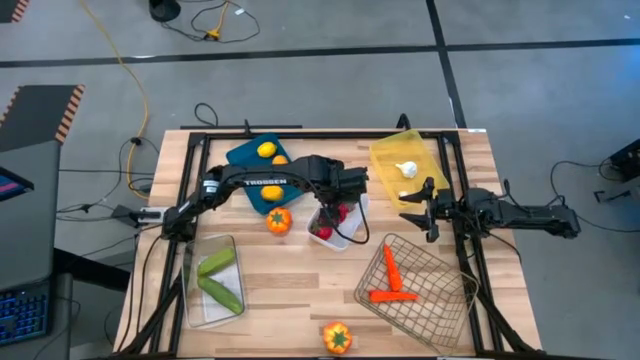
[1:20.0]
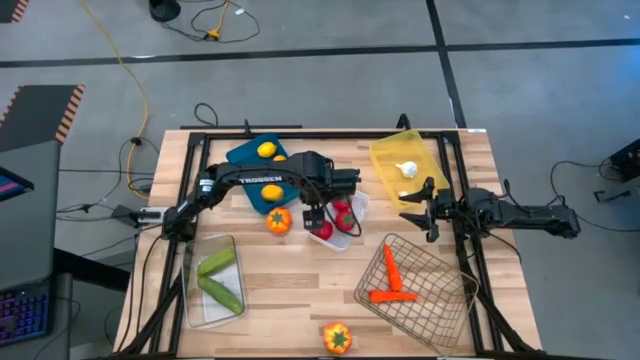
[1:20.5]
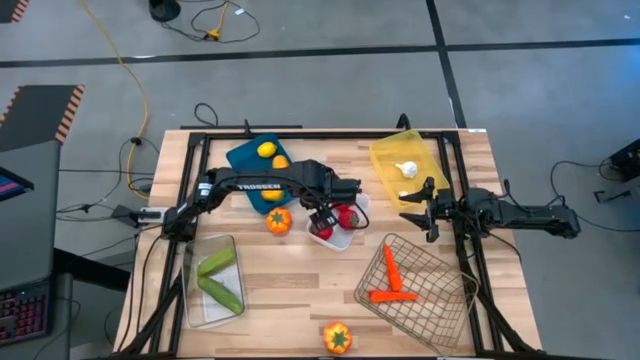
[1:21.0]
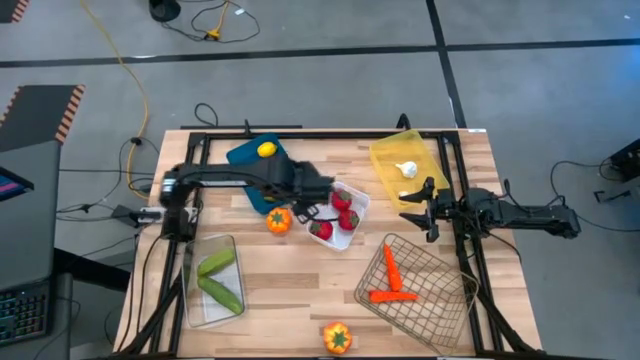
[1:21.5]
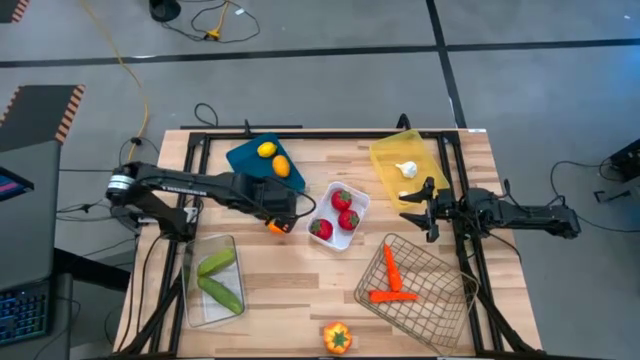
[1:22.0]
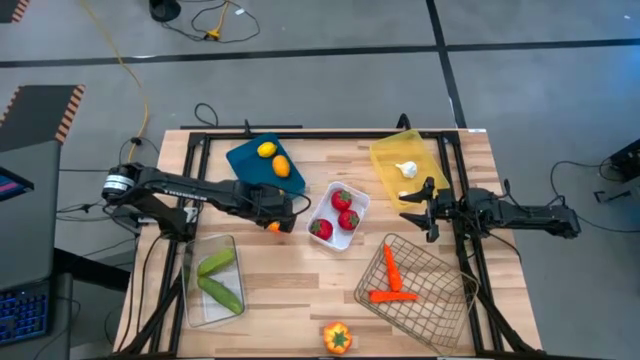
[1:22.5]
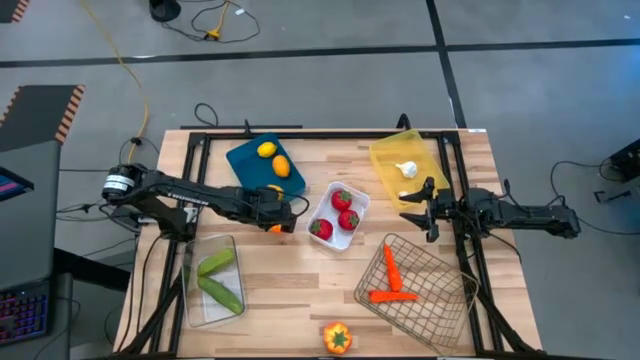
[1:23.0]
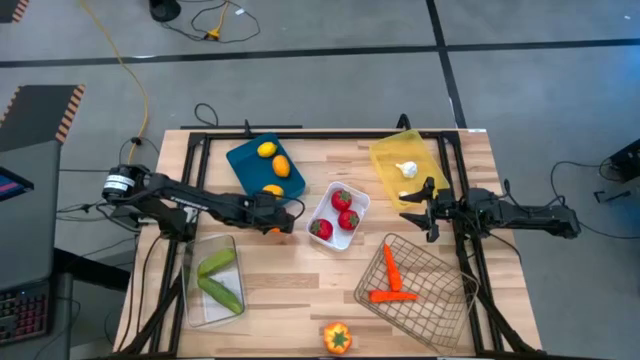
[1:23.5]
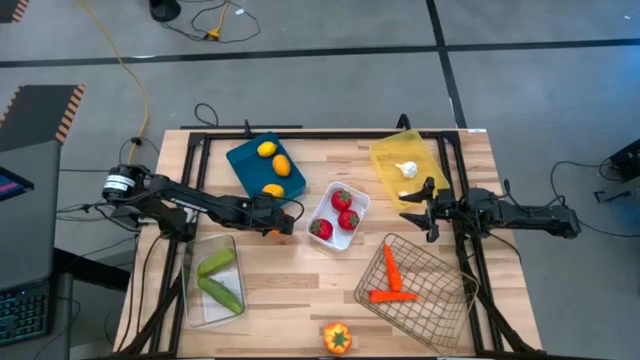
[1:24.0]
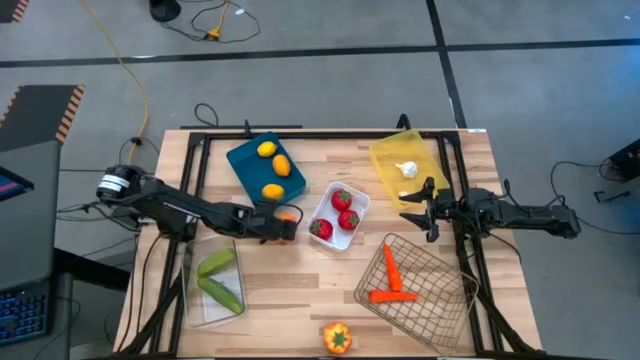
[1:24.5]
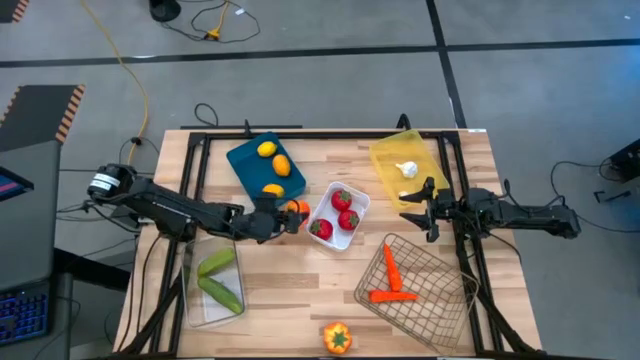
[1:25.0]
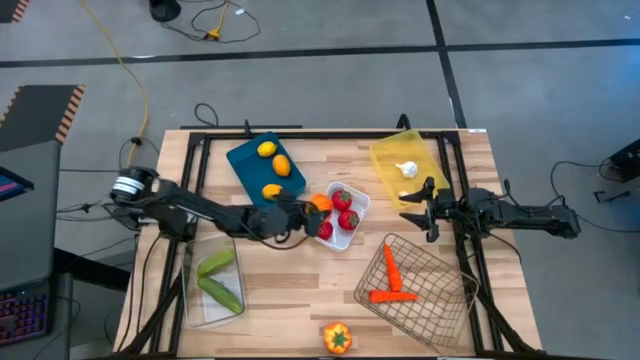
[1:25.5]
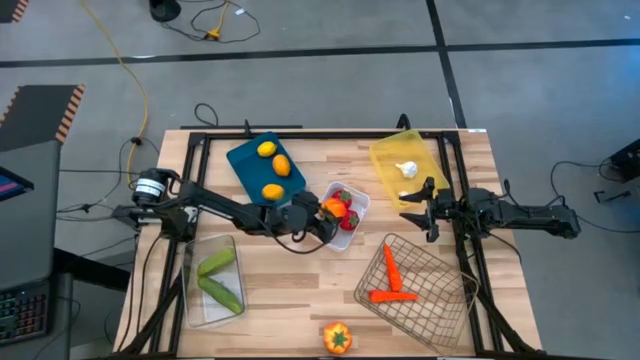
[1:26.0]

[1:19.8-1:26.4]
Task: Sort produce into baskets
Put the top orange tomato into the white bin

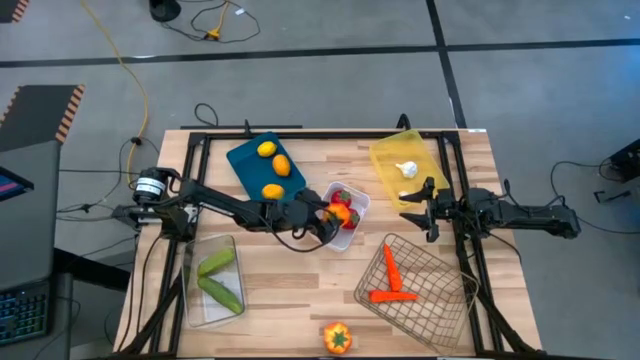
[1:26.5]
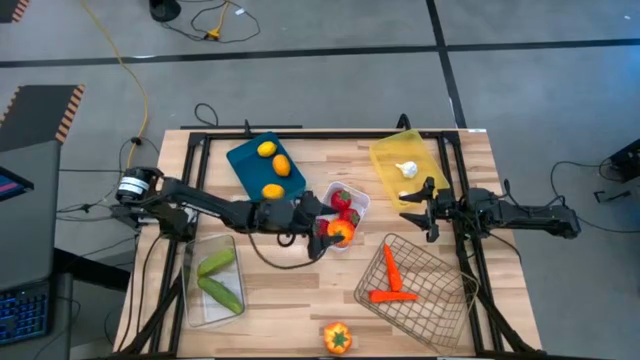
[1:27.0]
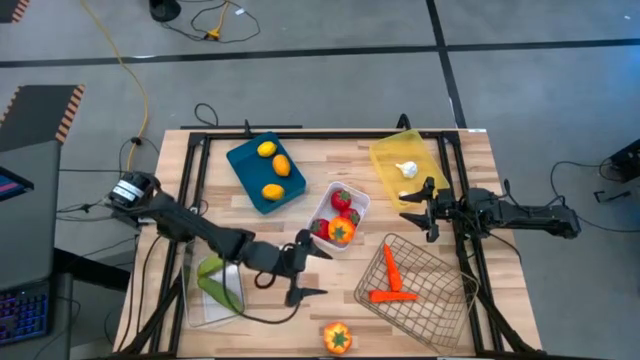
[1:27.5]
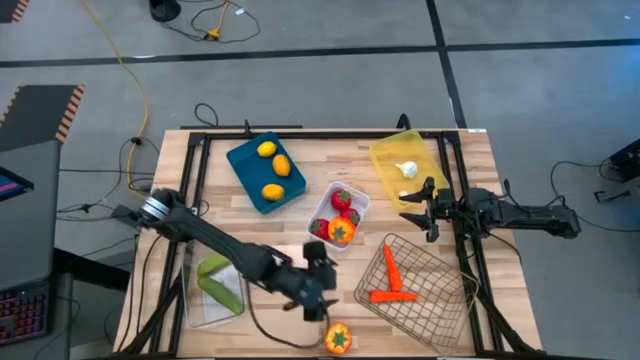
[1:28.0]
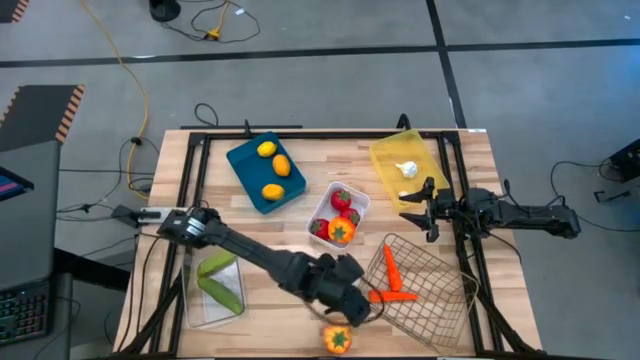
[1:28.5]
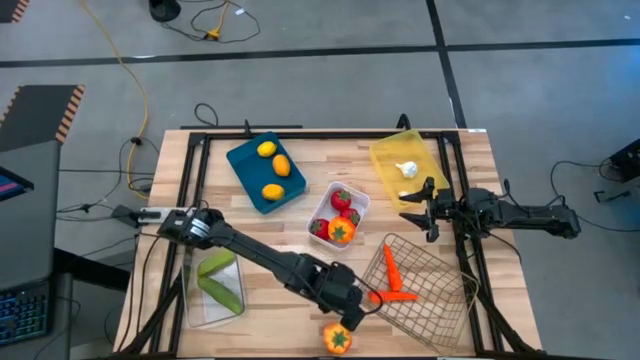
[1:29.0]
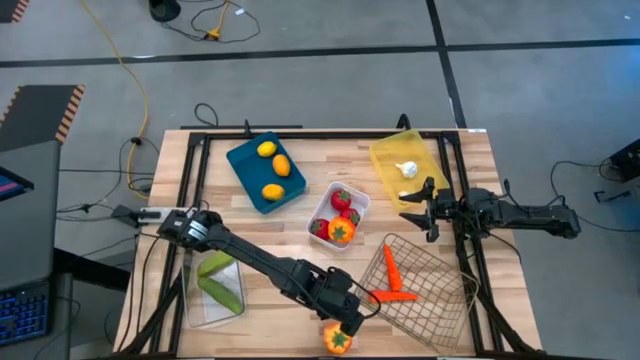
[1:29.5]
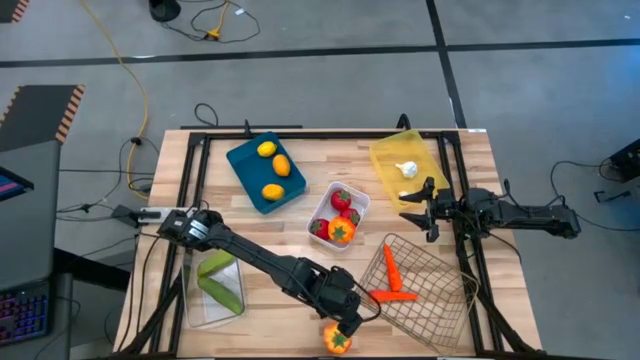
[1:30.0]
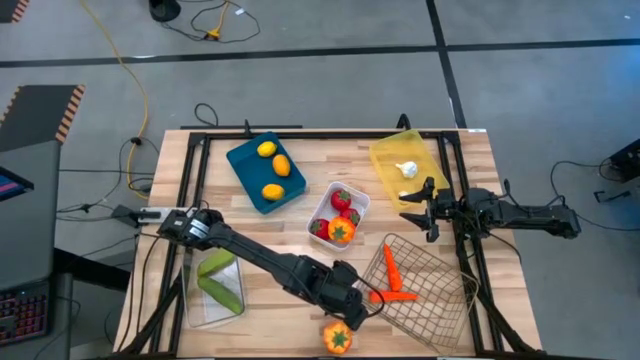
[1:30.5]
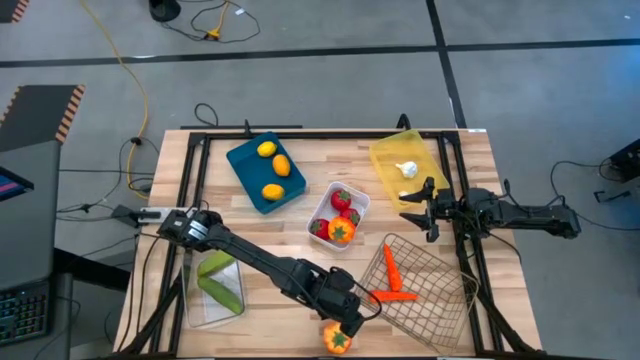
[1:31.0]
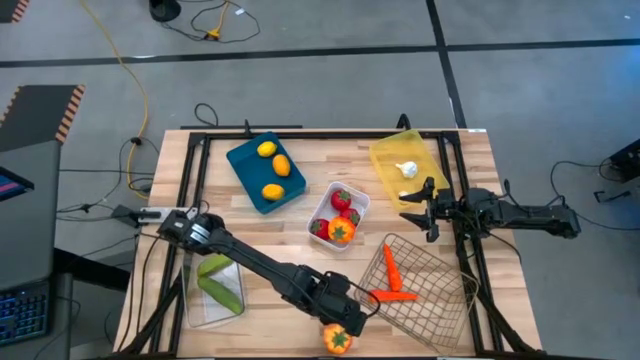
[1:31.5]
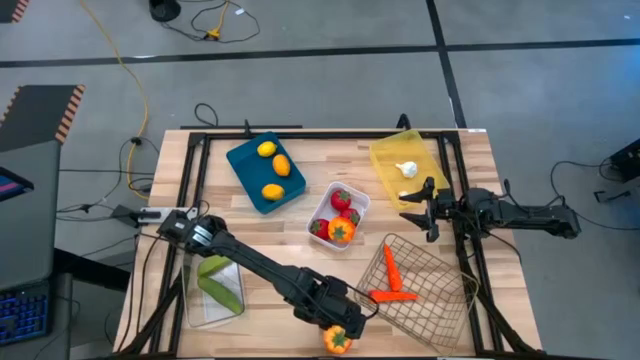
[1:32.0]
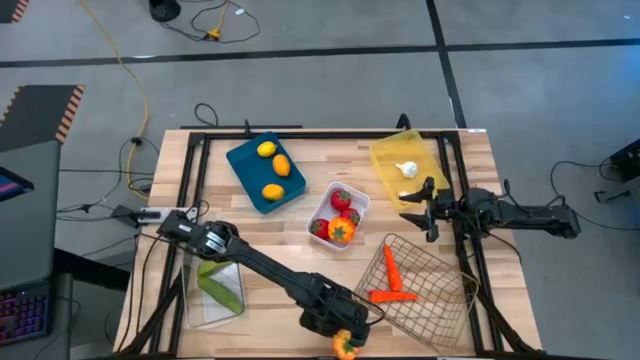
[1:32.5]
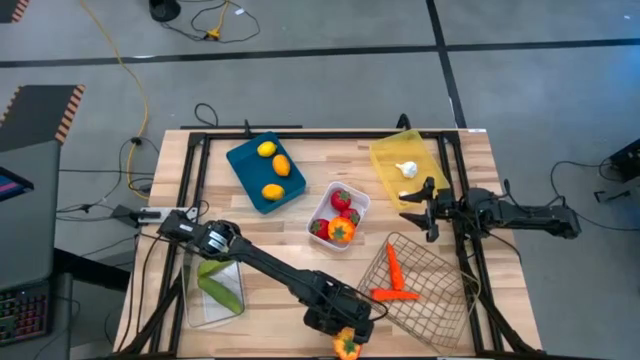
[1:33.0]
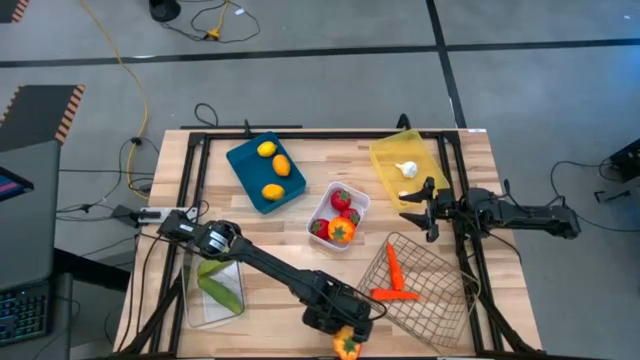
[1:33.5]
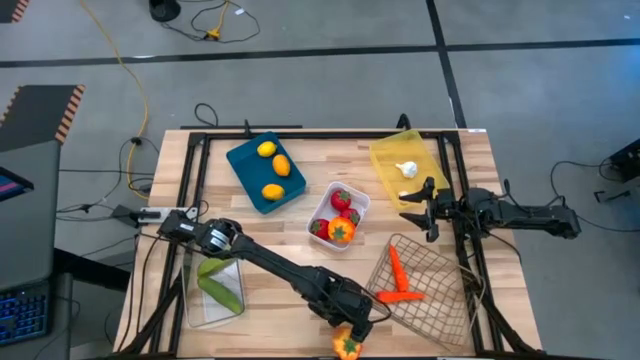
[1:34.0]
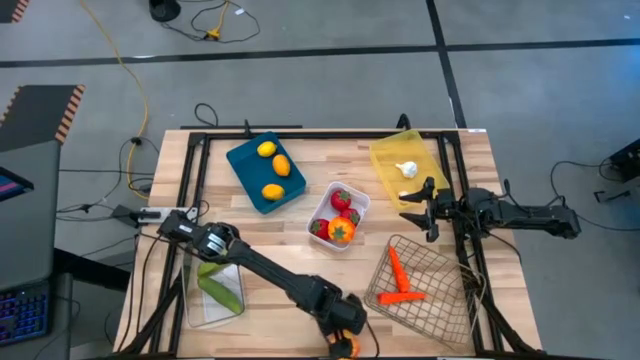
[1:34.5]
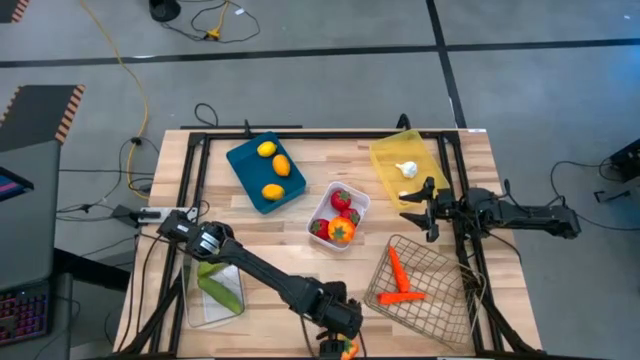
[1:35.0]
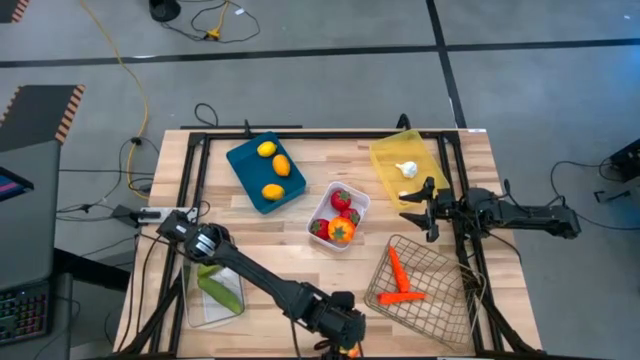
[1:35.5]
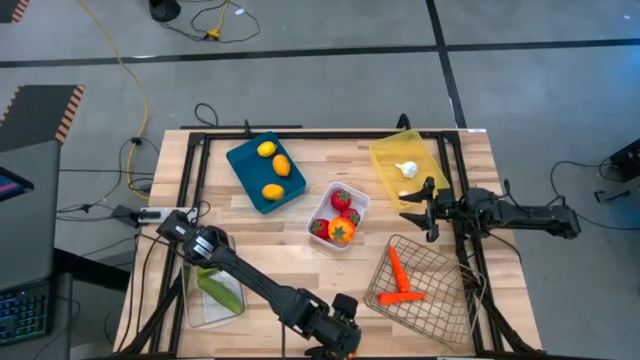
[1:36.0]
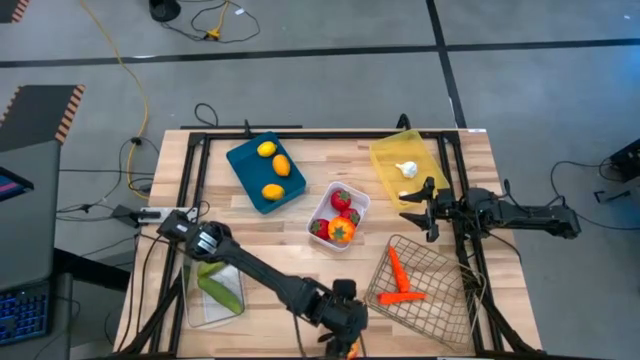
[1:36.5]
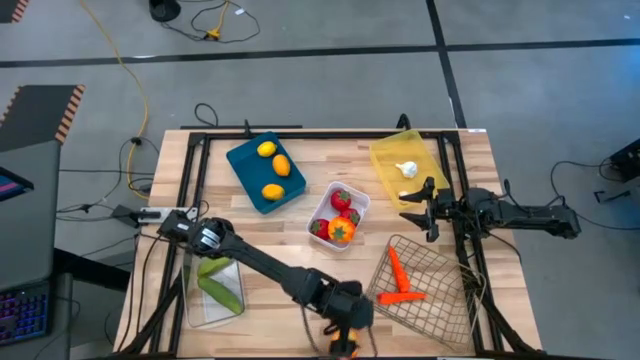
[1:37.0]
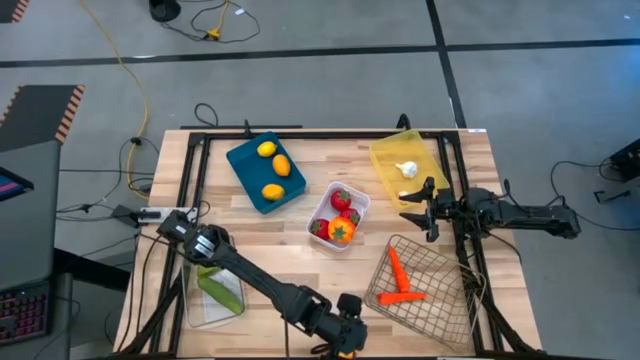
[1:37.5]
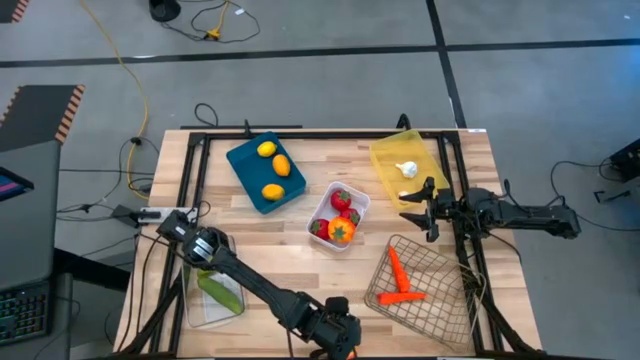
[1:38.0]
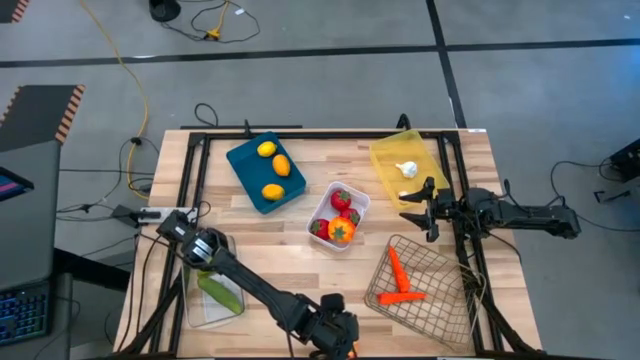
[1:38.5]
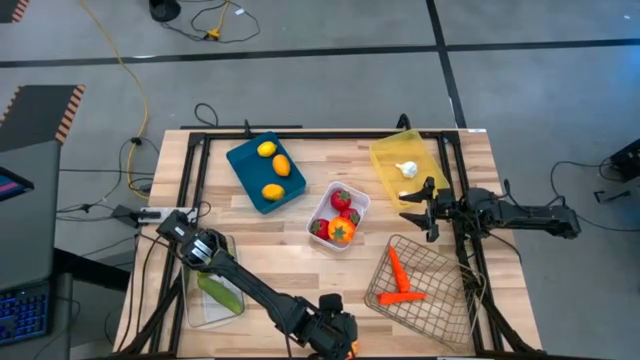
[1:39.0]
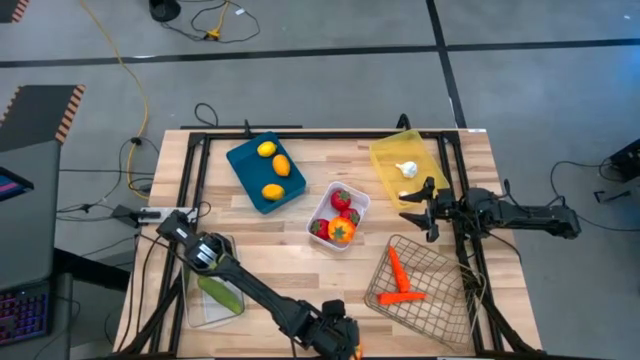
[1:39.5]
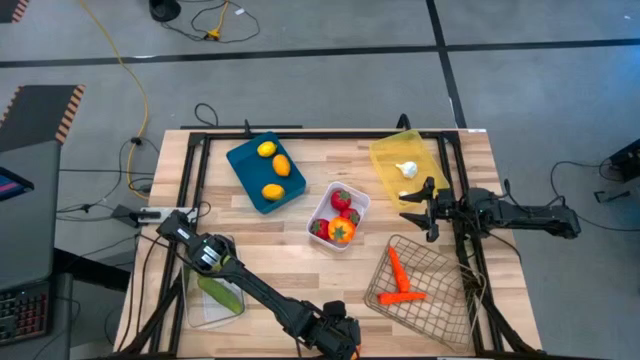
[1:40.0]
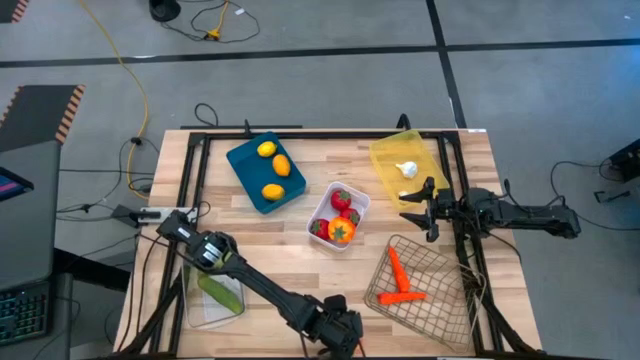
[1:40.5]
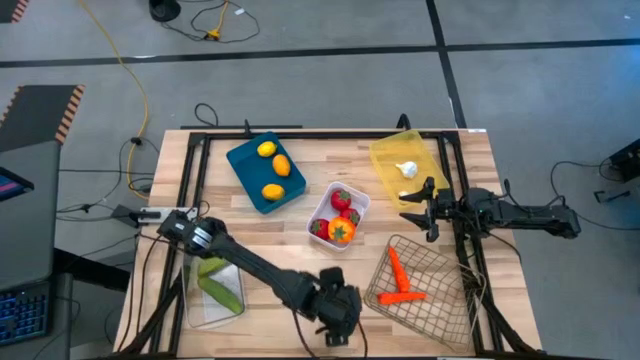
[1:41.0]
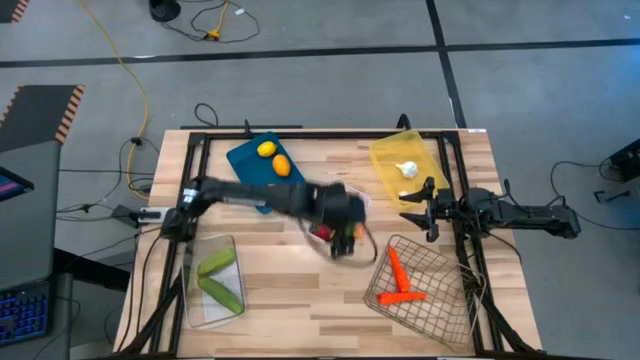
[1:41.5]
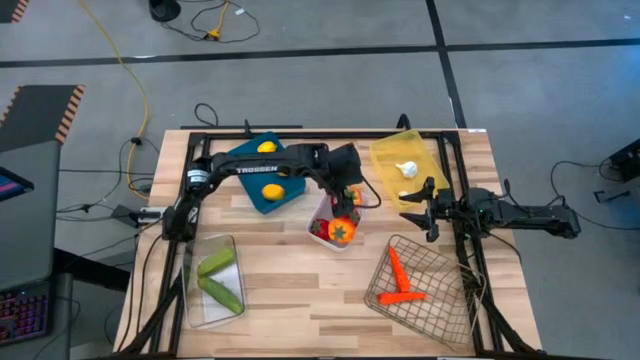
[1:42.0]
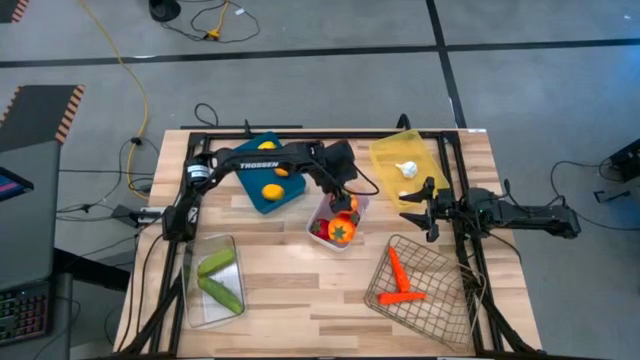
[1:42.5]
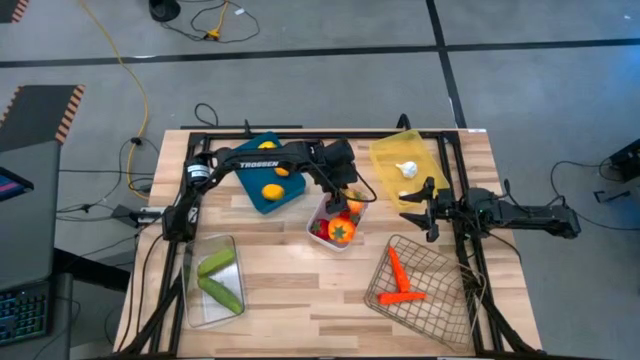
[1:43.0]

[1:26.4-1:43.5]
Put the orange tomato into the white bin
